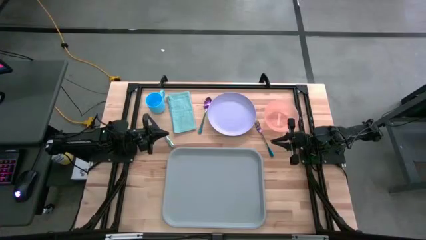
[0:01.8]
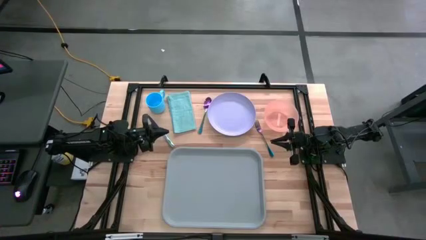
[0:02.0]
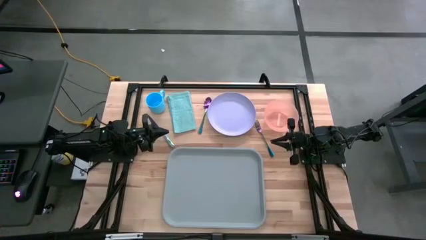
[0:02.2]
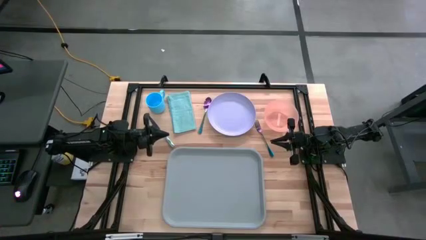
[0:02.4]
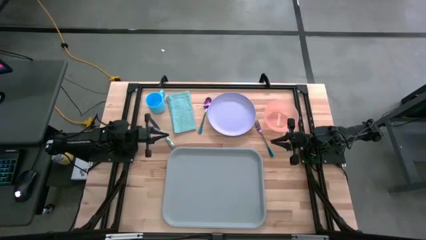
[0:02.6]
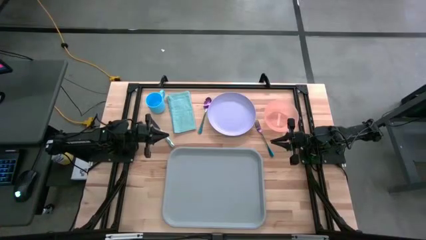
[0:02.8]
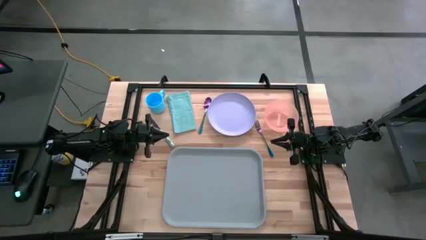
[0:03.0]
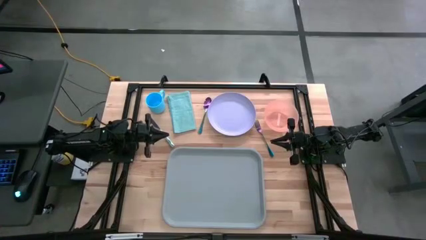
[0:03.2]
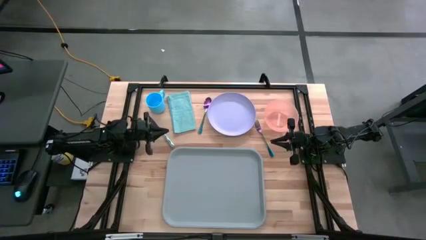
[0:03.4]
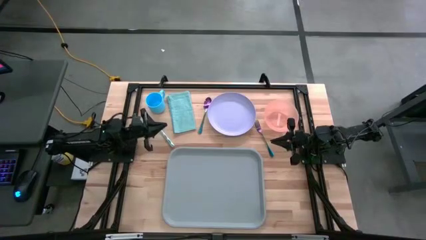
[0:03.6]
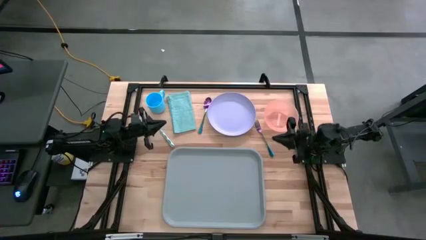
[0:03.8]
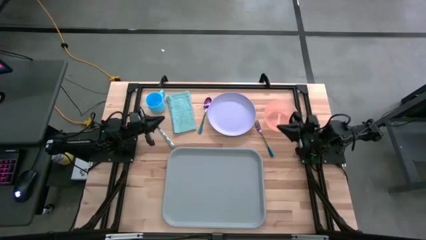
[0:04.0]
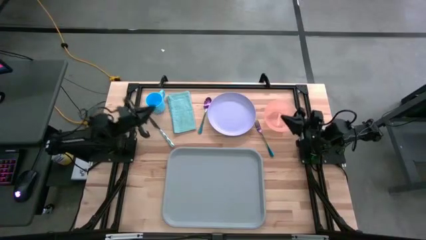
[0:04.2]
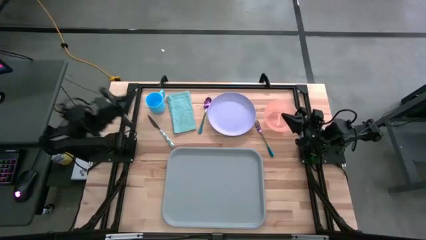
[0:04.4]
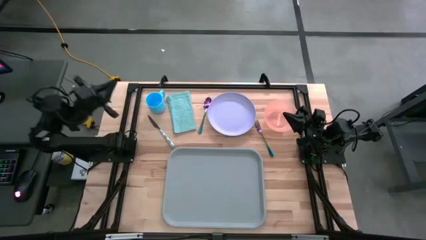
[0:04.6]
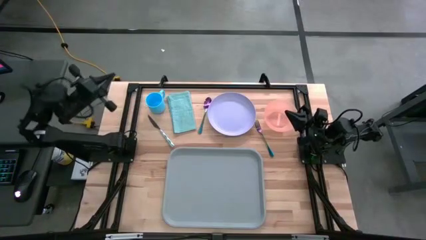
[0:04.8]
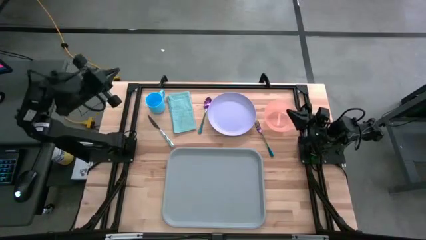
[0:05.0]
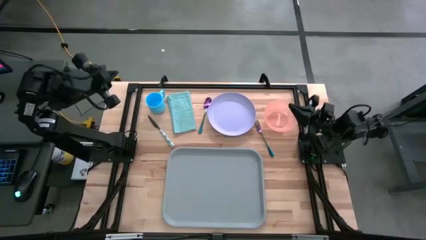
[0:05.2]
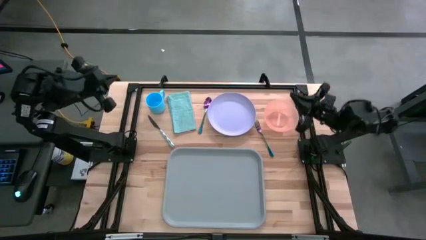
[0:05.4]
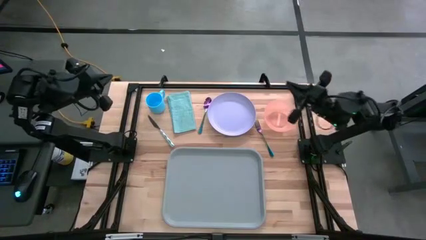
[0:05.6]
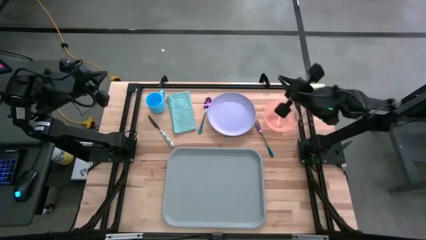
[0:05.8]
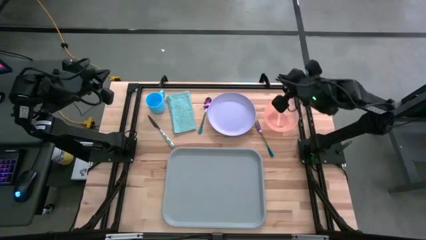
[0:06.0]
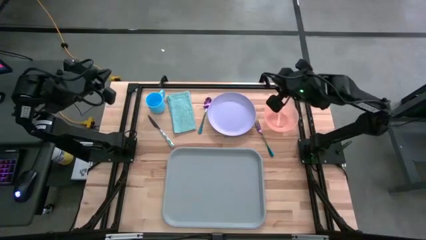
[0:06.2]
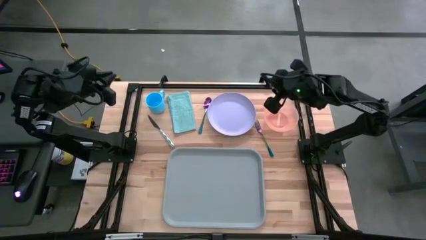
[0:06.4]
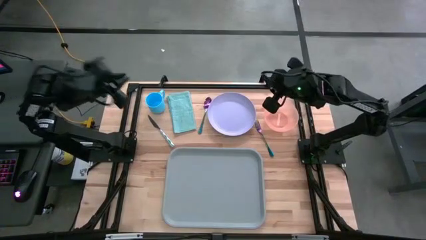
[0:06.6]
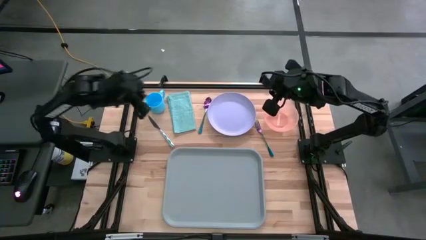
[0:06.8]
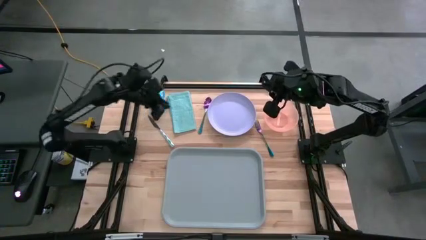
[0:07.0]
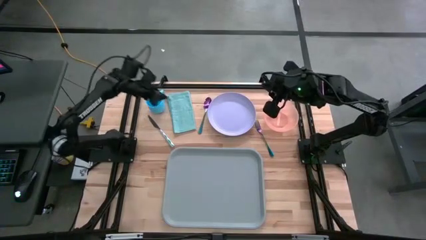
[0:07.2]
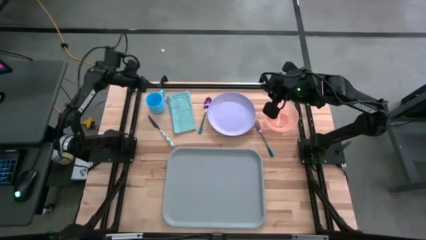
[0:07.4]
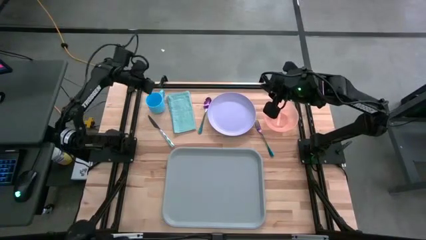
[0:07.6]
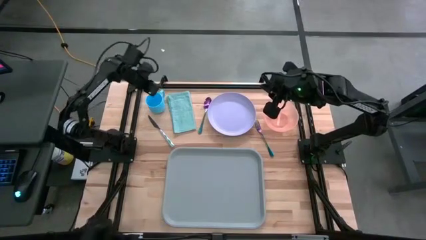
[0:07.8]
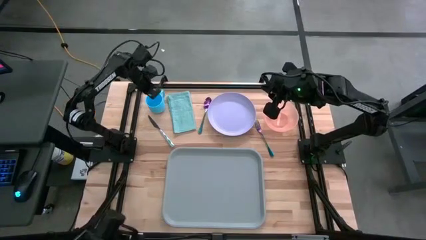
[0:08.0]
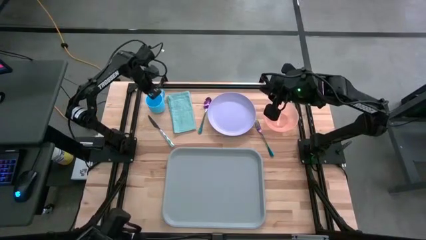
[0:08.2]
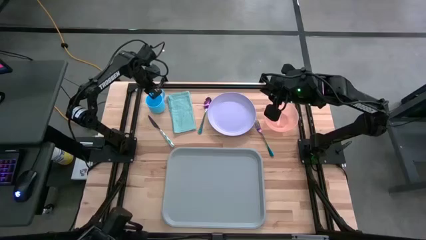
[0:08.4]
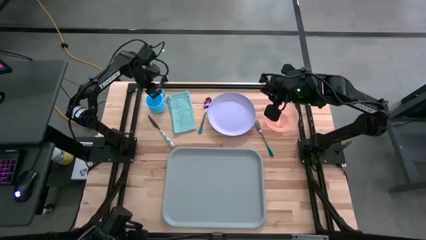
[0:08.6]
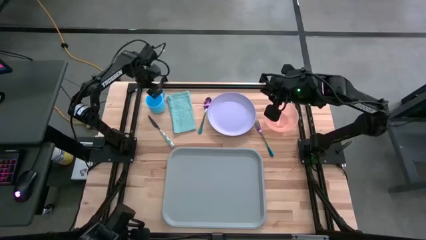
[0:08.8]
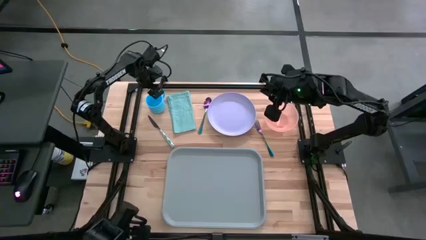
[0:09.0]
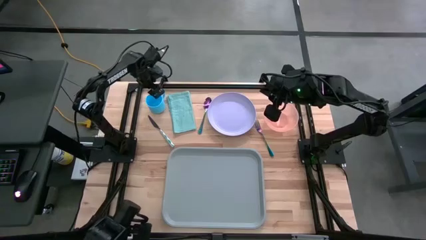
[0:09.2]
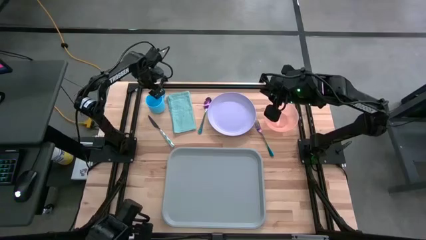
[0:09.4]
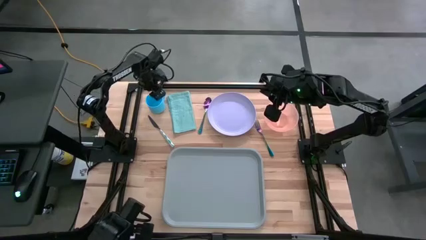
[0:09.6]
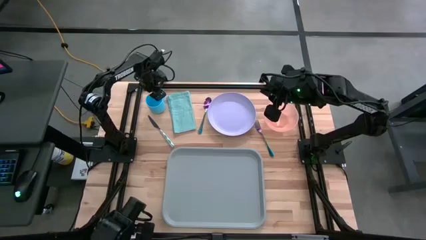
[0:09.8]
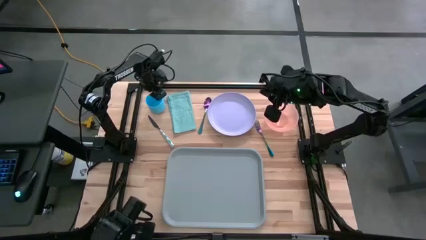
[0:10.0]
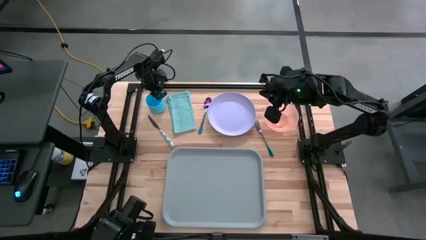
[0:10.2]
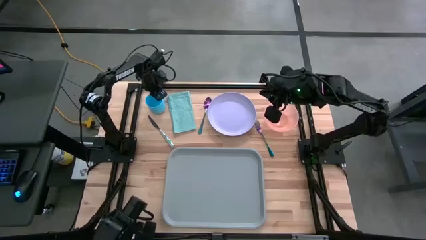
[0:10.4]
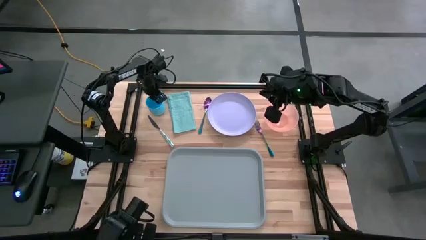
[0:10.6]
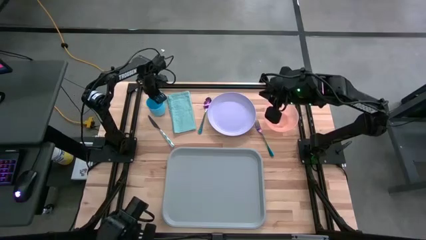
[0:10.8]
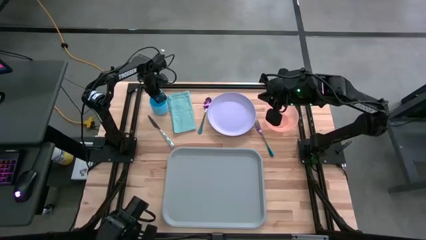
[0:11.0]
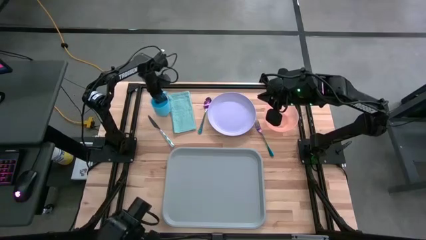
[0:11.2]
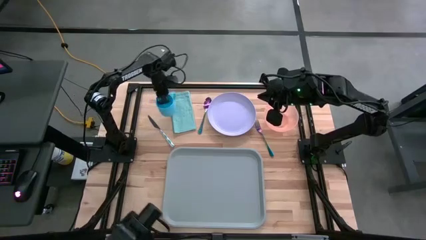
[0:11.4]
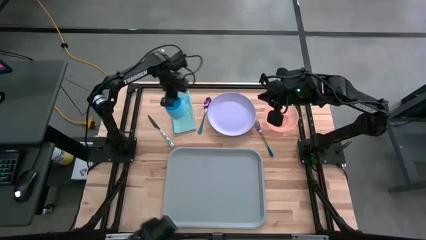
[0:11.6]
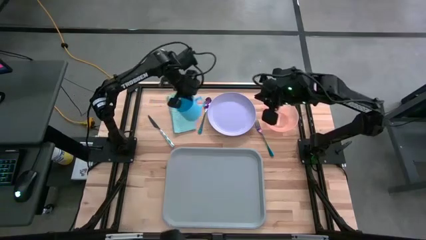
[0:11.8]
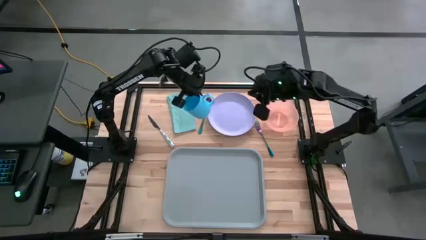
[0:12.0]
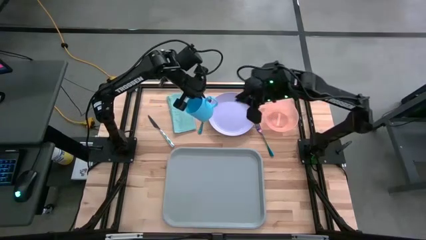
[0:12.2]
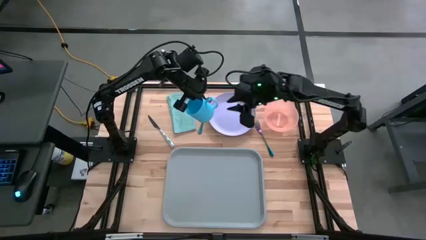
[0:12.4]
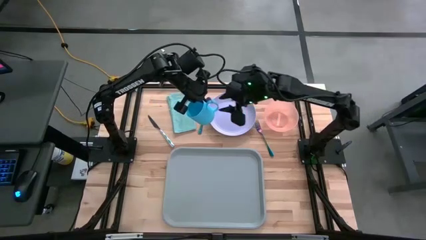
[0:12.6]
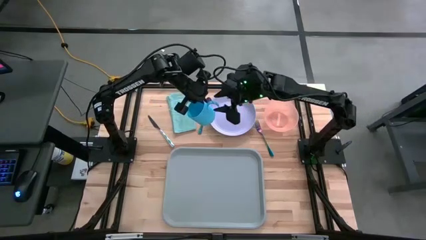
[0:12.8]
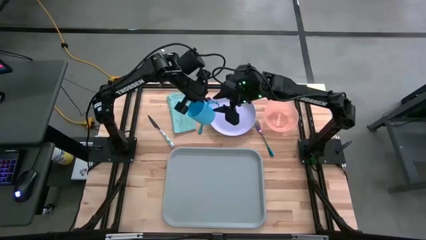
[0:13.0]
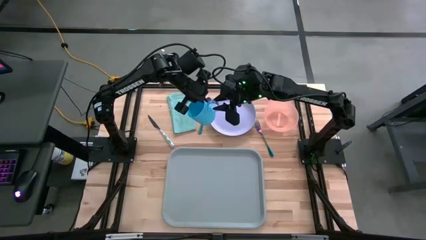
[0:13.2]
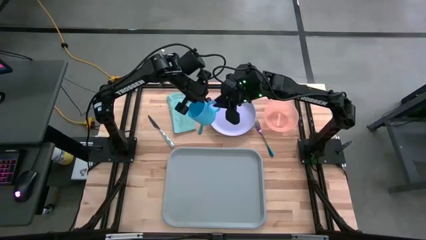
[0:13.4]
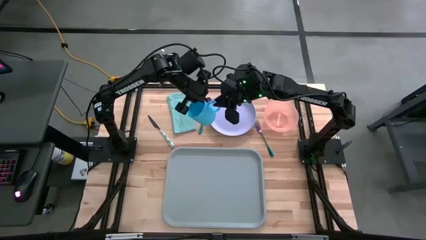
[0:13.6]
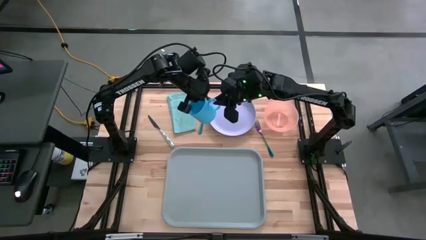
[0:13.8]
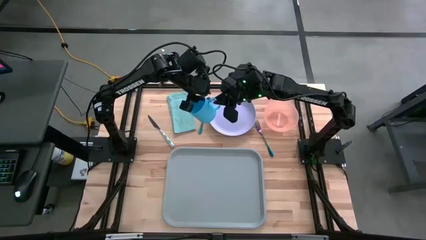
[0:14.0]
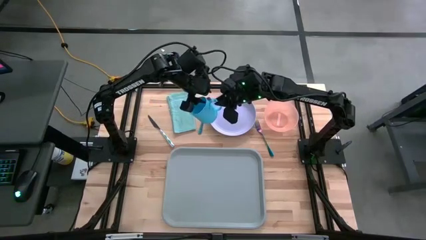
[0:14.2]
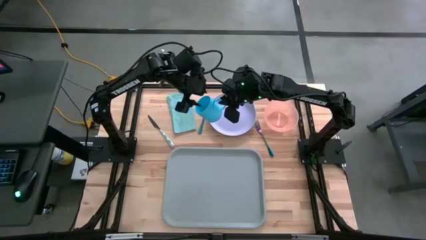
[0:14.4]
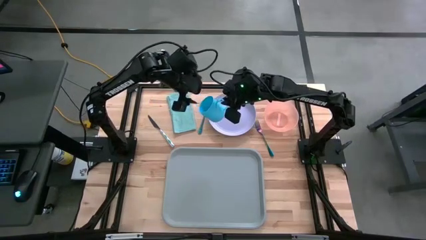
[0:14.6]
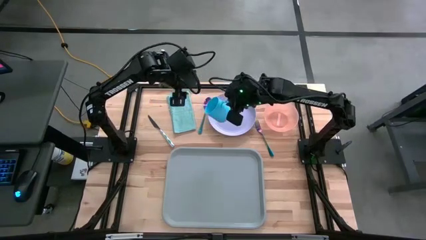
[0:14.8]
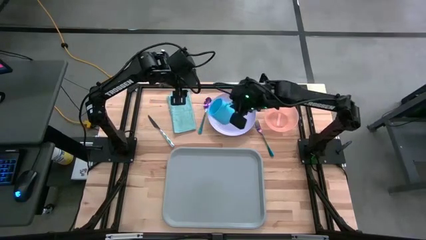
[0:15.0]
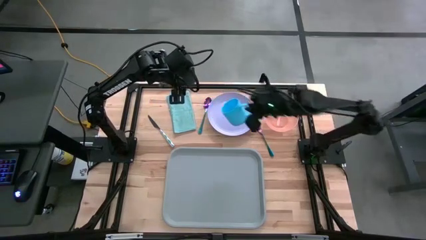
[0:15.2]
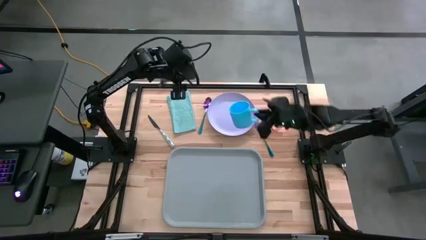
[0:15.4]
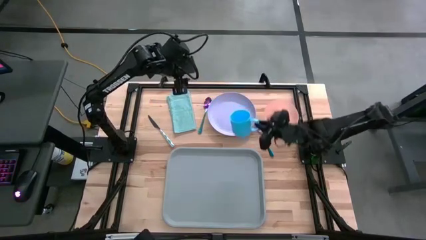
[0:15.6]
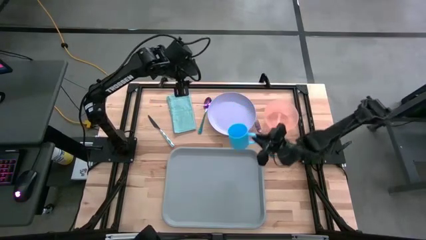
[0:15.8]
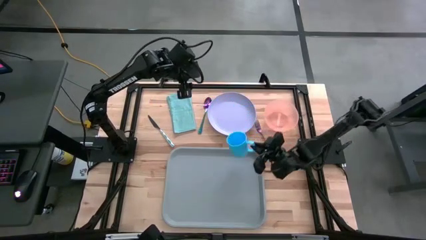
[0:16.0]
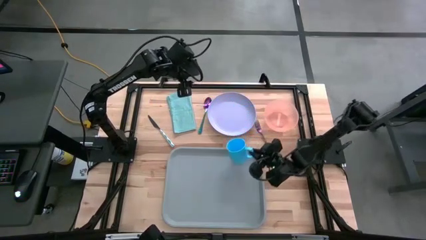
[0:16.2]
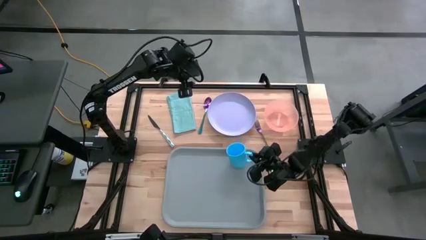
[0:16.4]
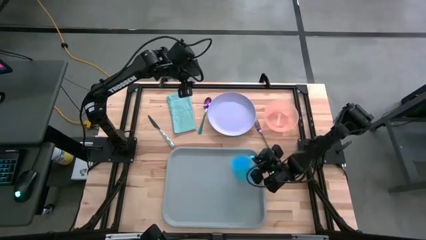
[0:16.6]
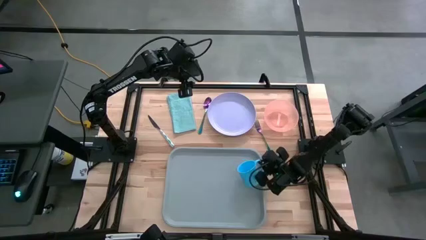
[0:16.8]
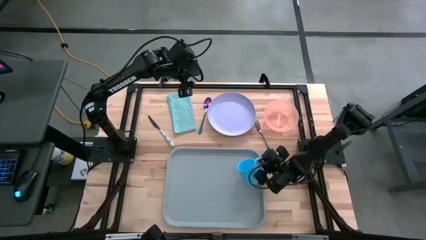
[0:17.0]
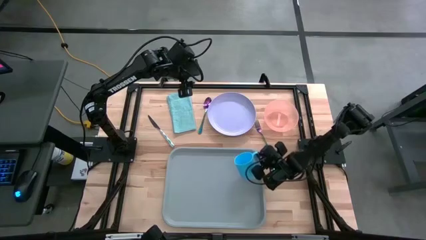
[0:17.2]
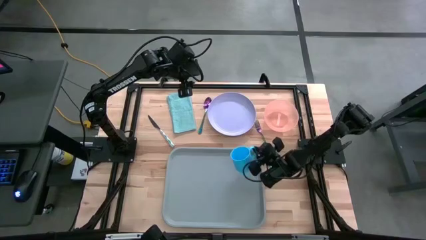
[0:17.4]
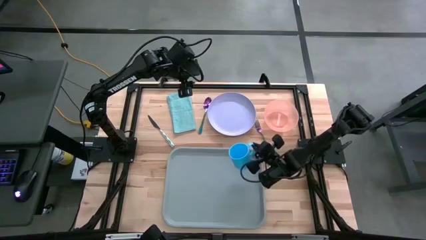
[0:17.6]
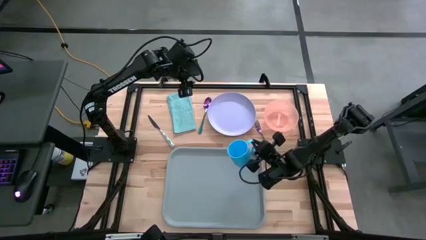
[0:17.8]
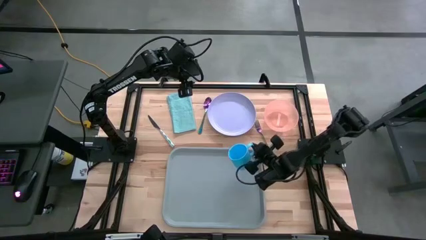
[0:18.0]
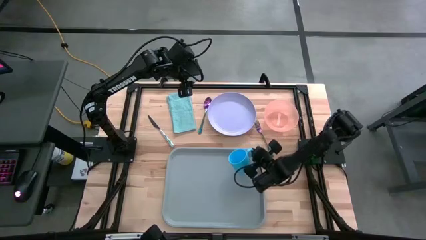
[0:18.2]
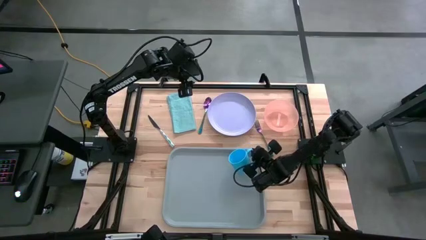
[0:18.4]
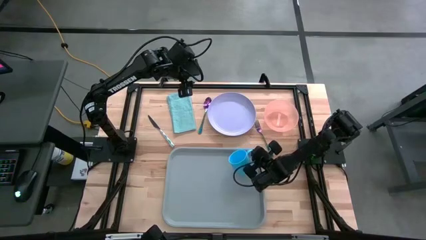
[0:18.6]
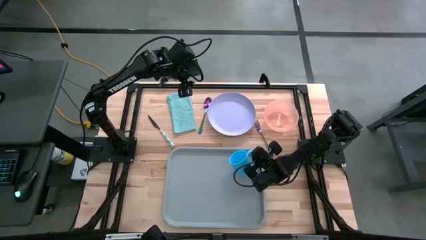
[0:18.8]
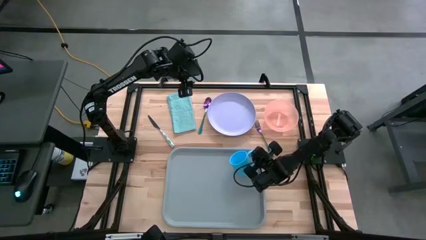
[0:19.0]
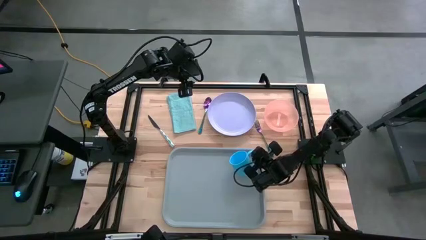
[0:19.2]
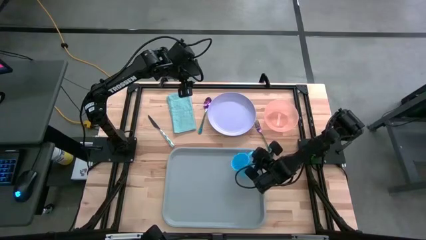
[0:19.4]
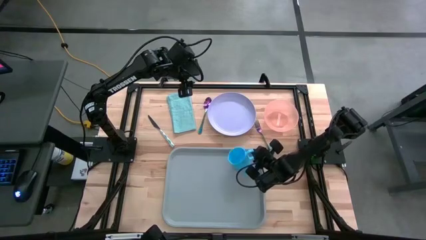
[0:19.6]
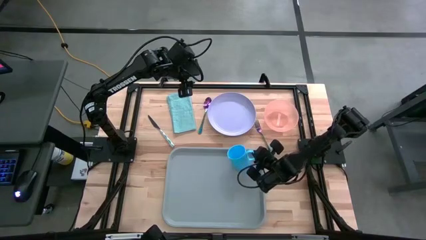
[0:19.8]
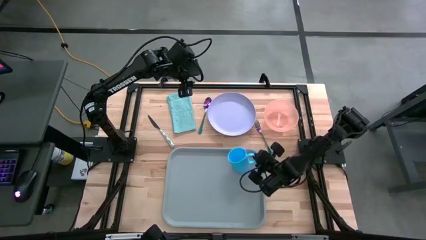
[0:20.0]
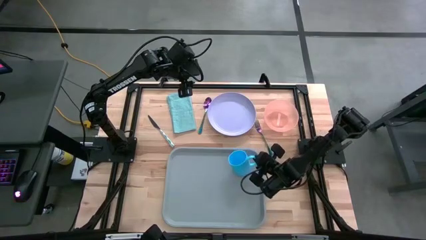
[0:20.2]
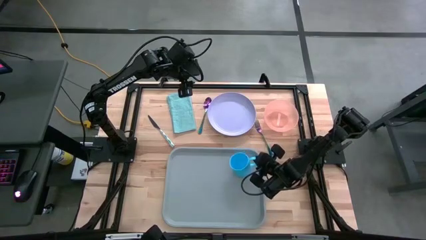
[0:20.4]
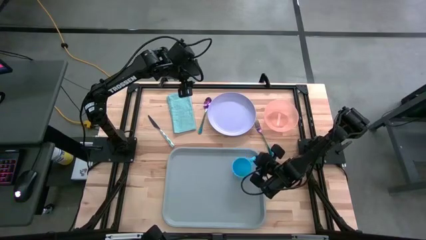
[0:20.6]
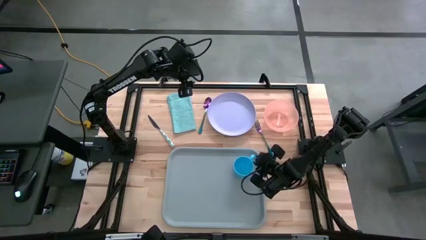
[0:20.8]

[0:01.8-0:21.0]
Task: Set up tray
Put the blue mug on the top right of the gray tray
